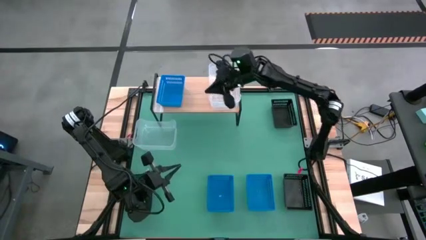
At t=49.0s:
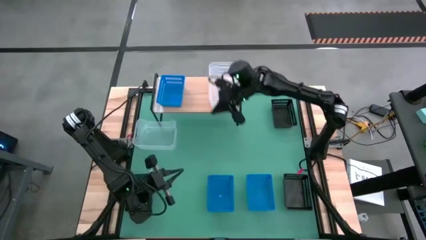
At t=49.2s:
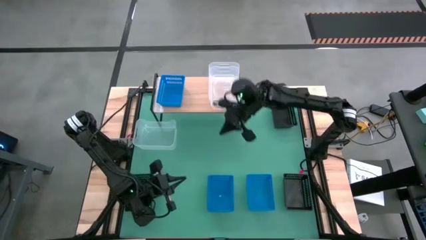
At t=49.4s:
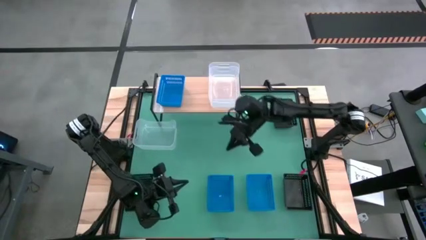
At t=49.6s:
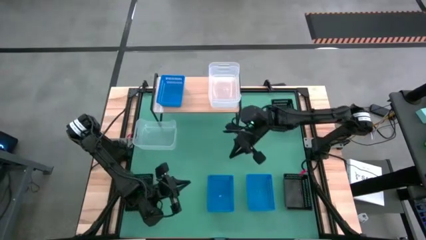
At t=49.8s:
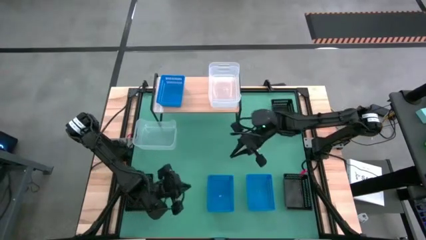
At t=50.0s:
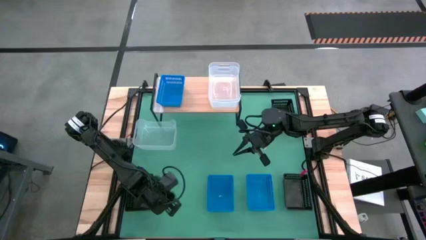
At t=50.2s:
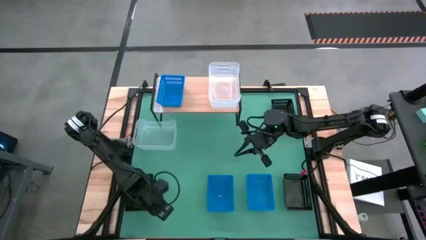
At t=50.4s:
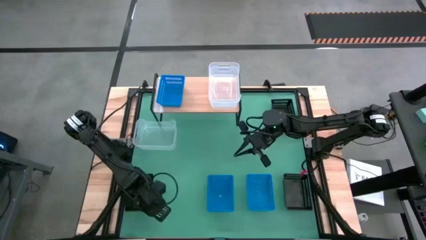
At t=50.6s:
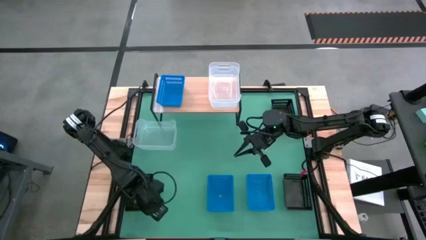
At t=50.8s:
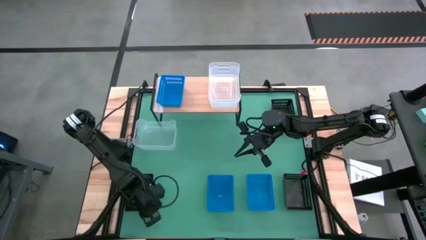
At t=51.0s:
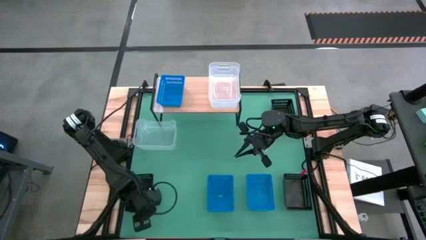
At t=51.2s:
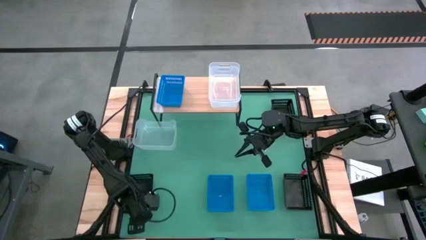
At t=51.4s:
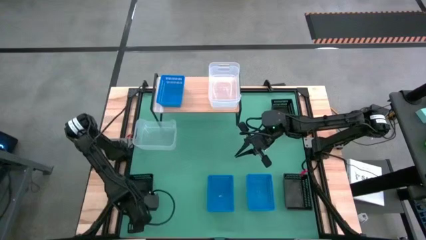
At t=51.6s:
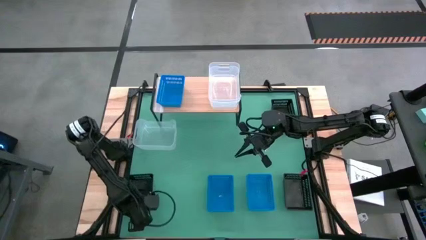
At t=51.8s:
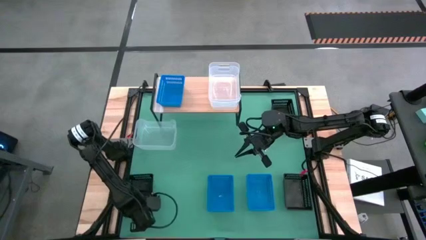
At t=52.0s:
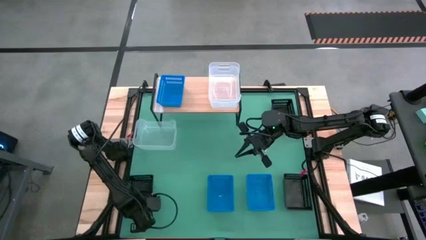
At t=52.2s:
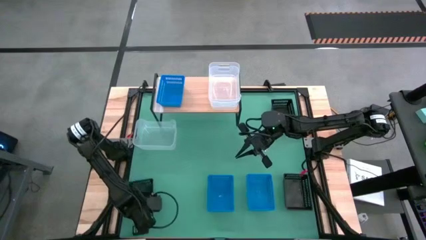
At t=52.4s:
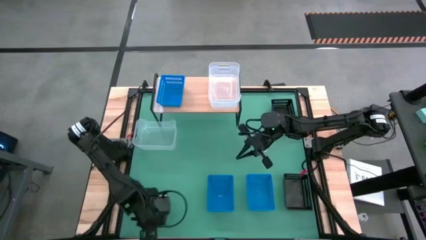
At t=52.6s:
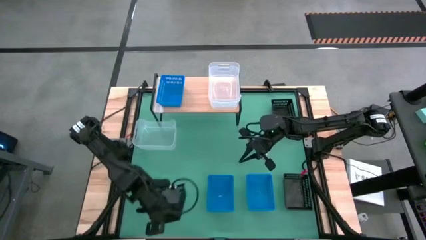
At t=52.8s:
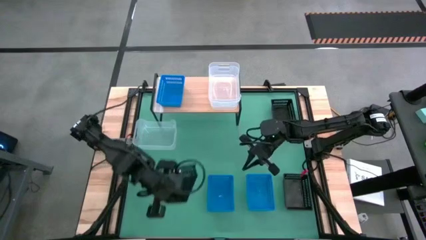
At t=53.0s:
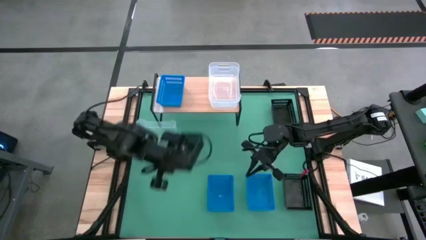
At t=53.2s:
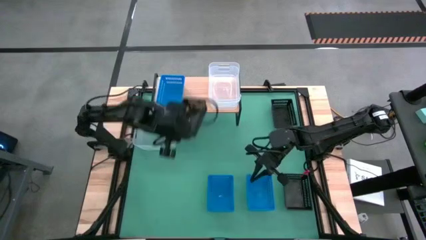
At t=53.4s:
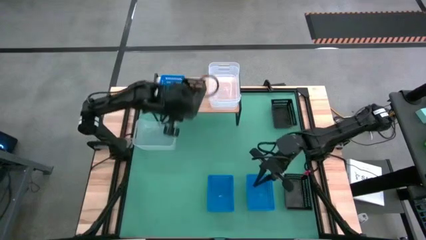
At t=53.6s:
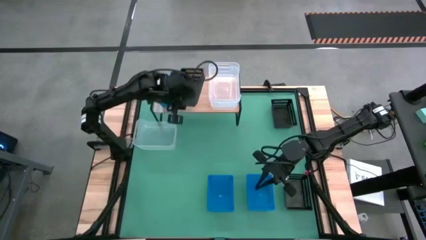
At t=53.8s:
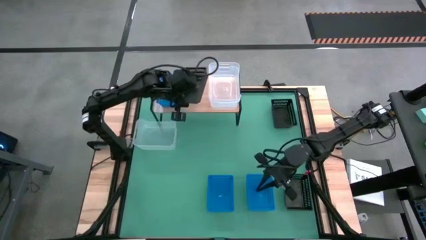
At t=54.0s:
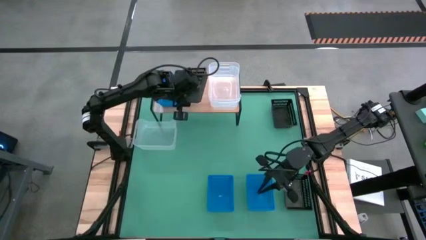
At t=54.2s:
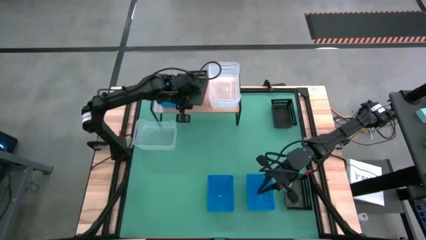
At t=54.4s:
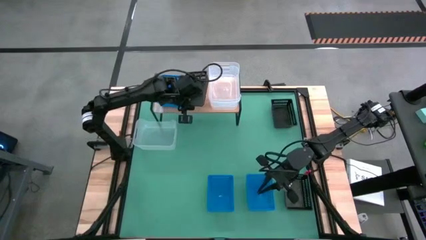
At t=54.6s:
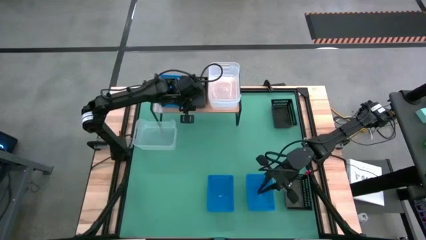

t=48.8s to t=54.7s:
Task: Stack baskets on shelf by color
Put the bottom left black bin on the shelf

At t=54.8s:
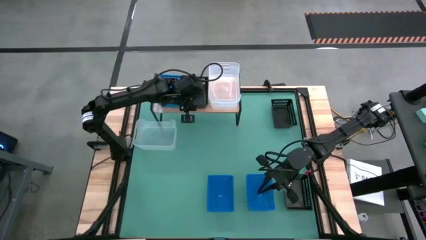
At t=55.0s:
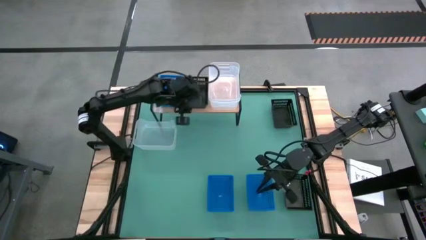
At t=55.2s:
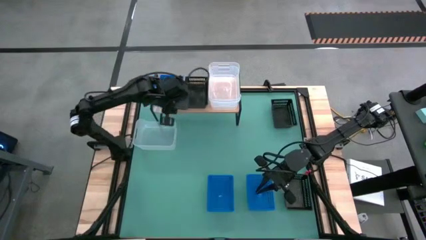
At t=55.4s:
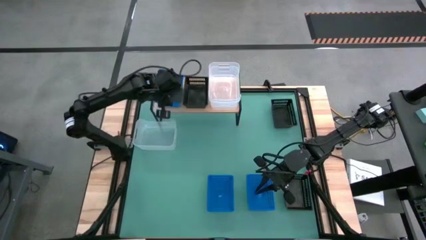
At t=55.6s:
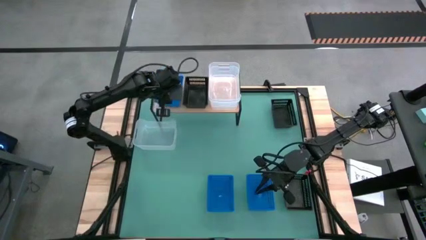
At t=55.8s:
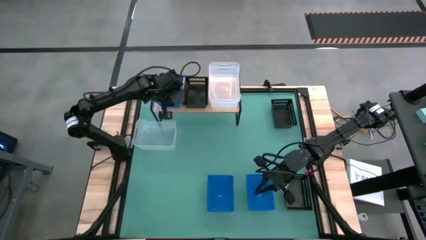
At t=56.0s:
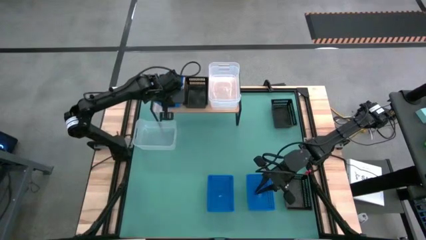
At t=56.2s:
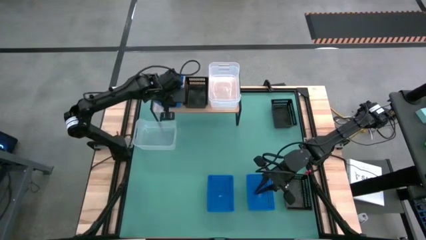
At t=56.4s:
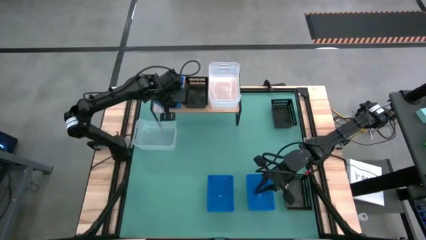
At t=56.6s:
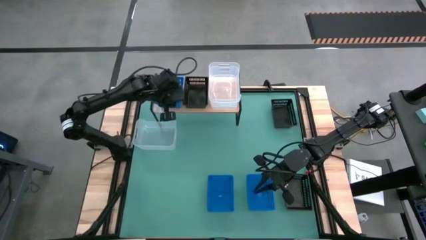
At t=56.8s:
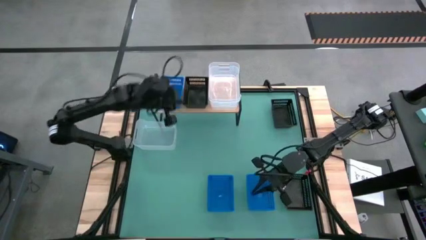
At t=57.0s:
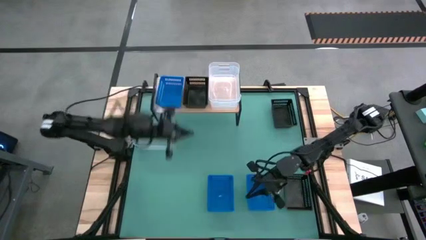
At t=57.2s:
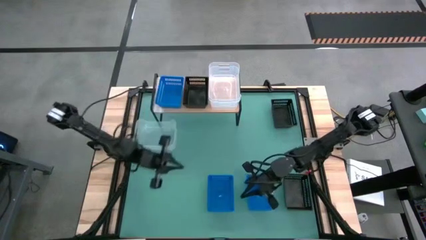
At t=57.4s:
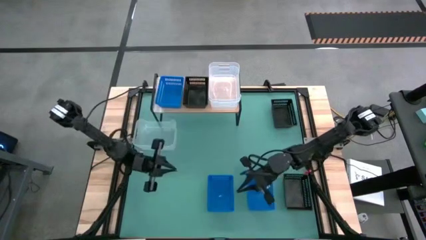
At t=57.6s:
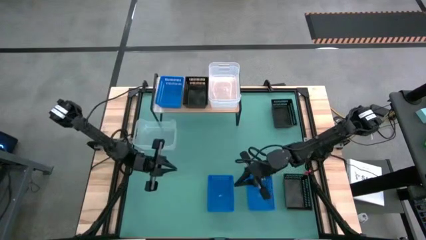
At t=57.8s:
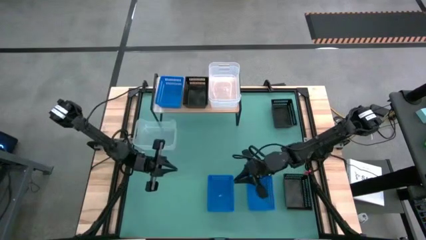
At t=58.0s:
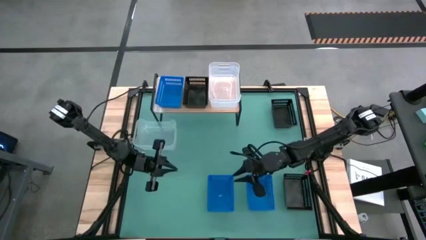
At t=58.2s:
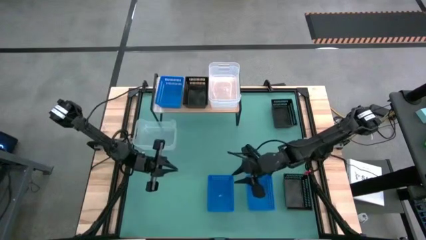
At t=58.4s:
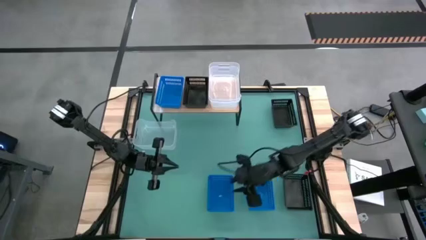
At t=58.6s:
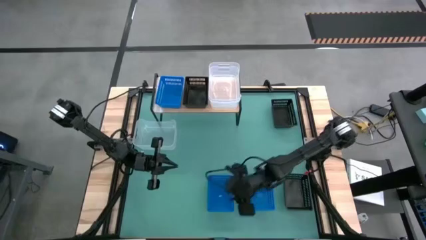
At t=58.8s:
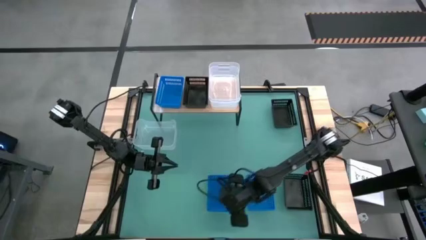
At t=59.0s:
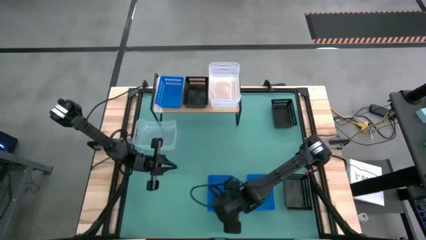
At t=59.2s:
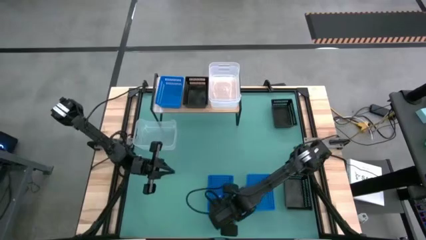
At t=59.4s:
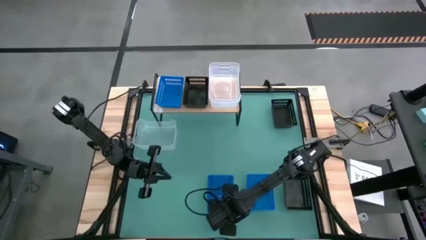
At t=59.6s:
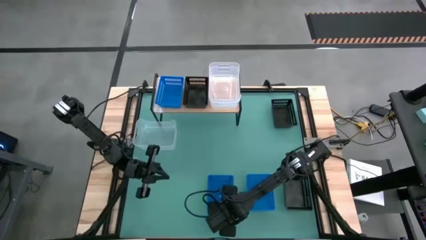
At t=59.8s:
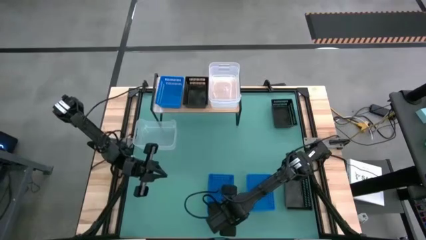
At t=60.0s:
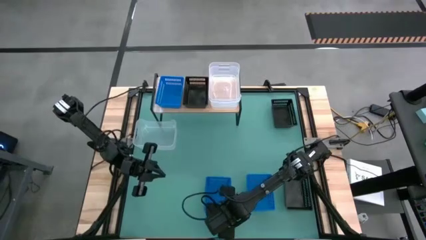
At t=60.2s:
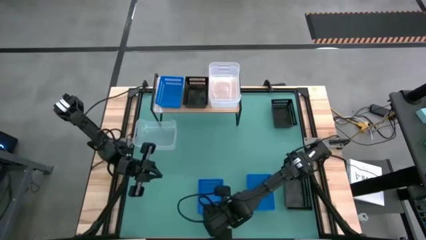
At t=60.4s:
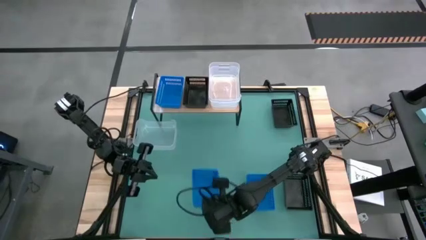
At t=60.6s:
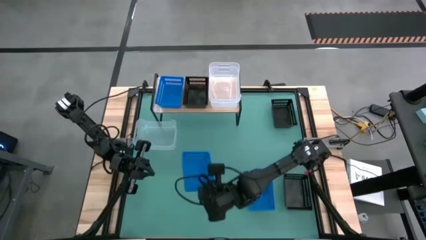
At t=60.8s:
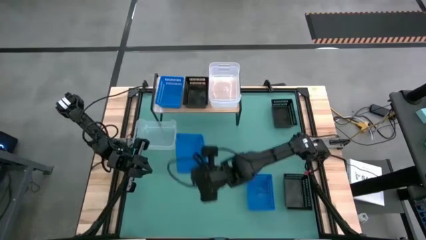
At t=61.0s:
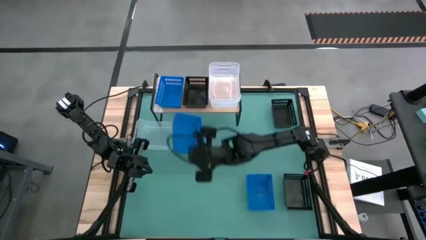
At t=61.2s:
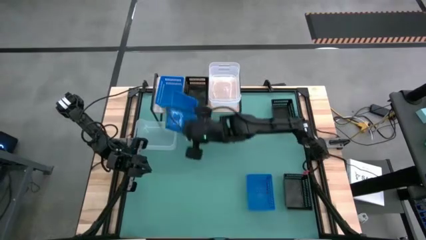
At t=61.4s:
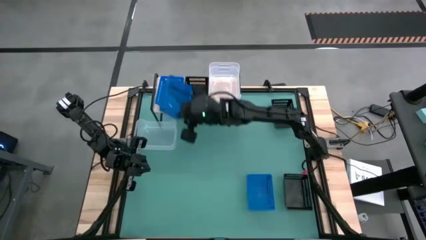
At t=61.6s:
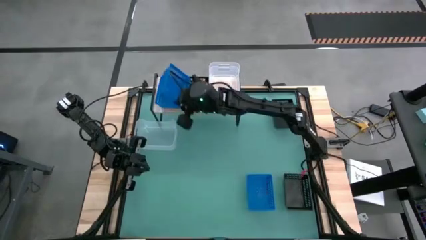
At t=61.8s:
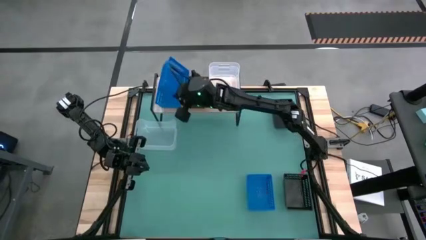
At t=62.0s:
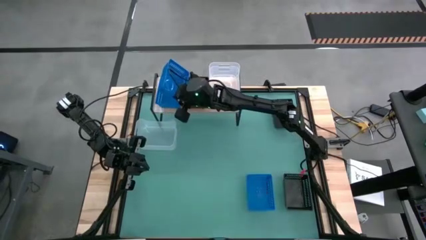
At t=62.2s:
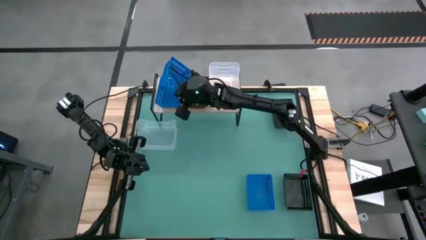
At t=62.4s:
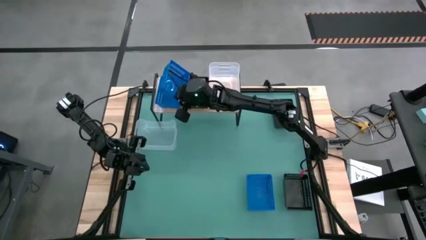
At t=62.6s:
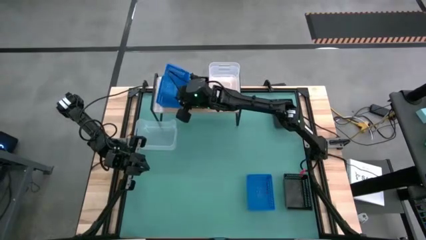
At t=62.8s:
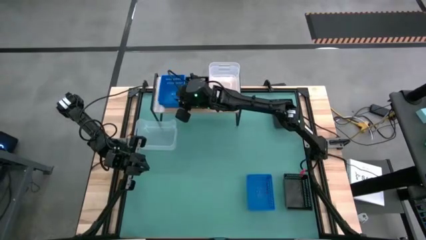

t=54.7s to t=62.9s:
Stack the left blue bin on the other blue bin on the shelf

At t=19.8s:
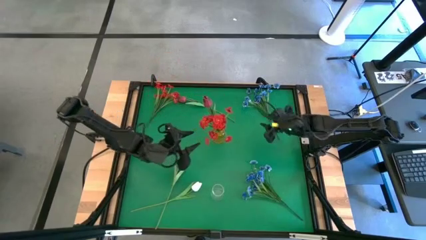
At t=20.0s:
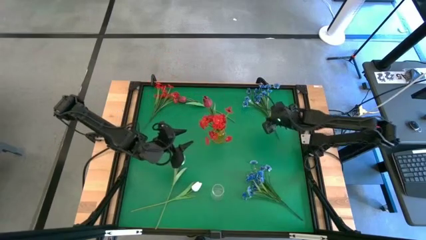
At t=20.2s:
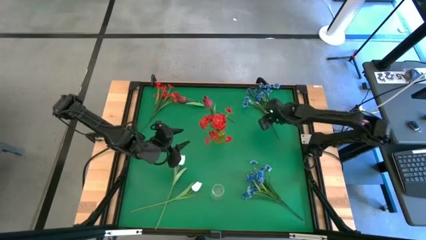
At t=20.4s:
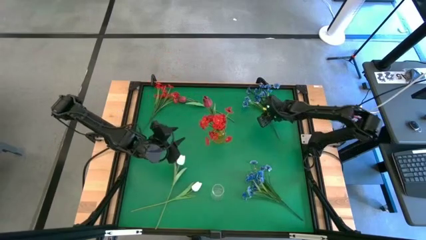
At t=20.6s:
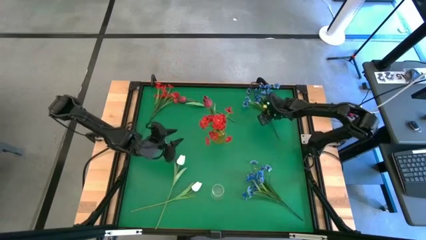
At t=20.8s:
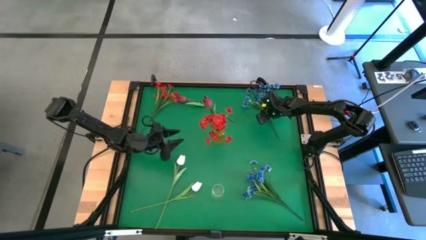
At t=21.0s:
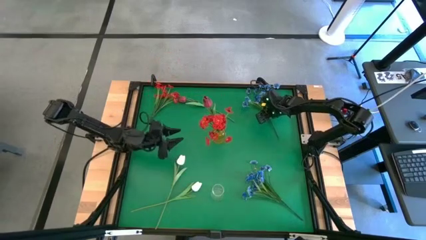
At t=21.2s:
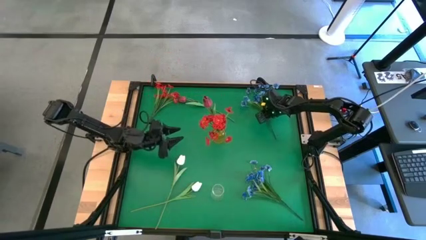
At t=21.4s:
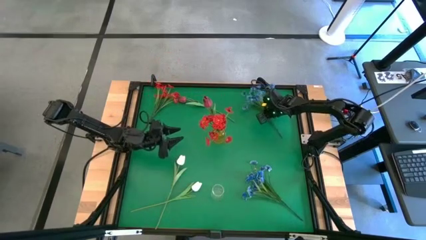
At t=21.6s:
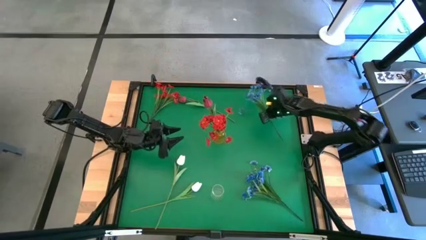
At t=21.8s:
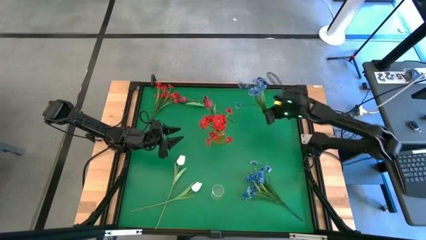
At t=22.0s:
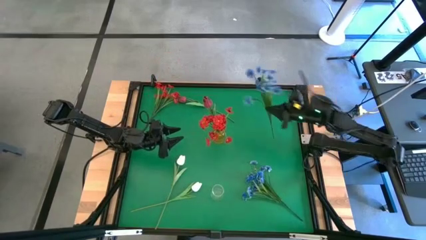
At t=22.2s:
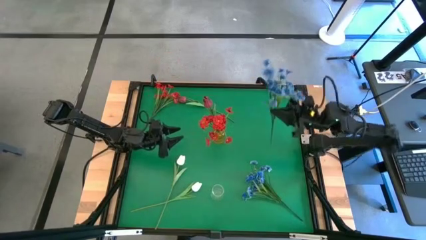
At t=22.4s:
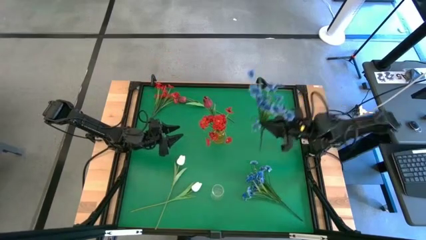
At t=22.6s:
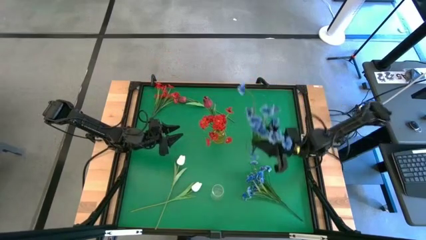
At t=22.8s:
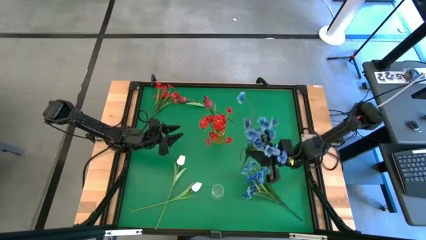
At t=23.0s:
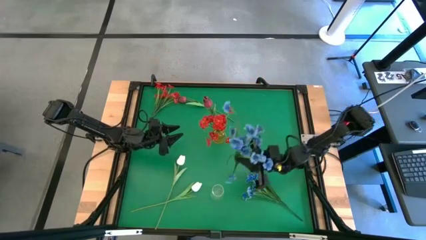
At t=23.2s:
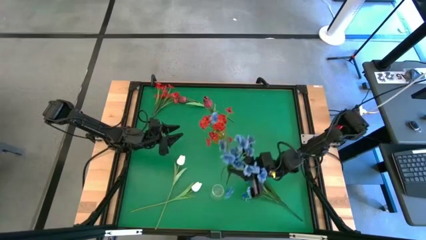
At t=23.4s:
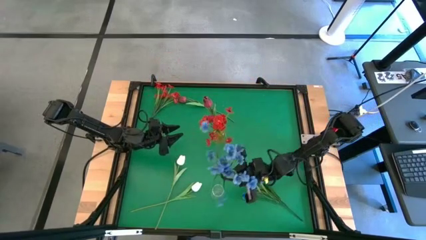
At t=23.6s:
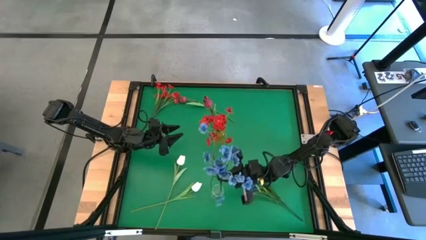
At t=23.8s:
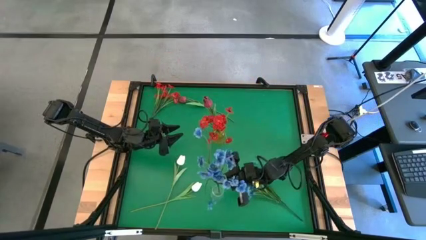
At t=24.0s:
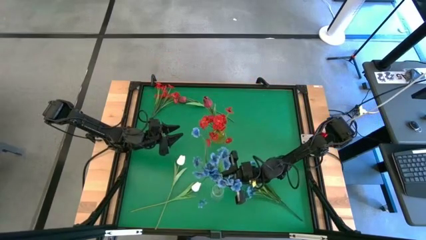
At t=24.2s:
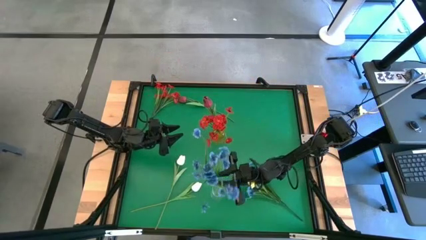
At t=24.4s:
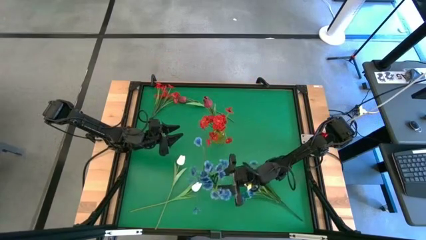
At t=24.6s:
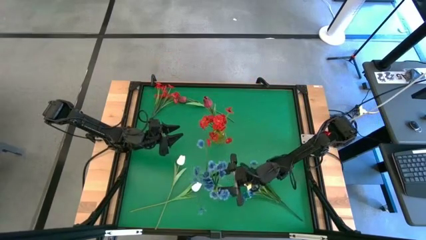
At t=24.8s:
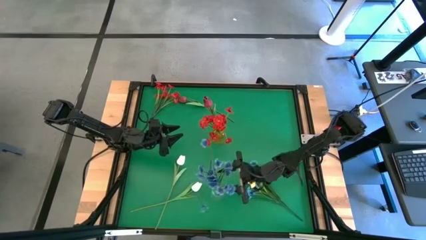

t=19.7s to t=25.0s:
Task: Sort flowers into vase by color
Put the top blue flowers into the transparent vase
